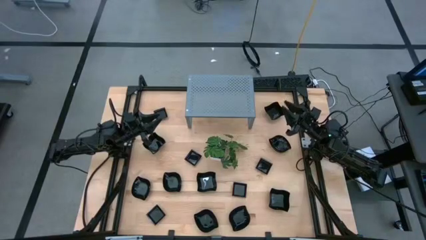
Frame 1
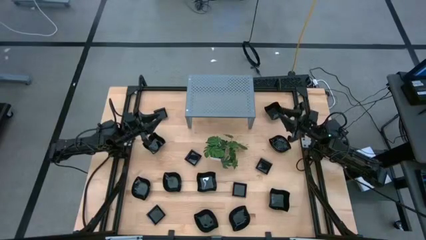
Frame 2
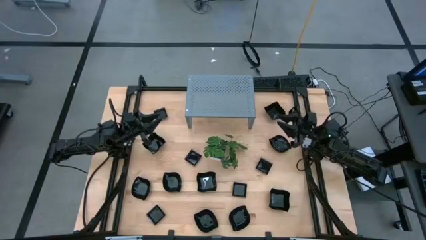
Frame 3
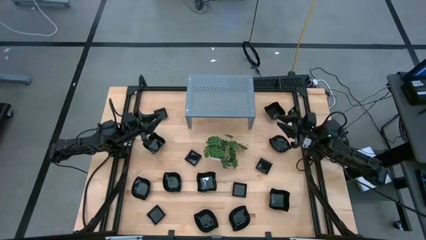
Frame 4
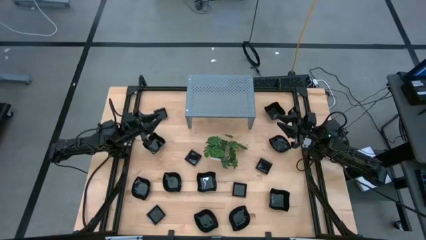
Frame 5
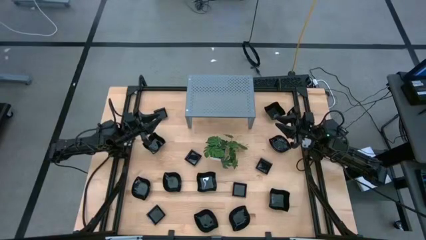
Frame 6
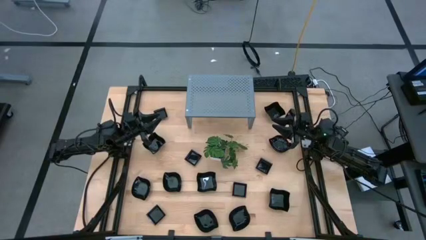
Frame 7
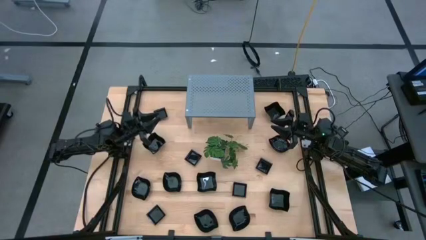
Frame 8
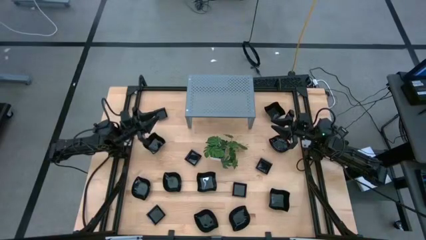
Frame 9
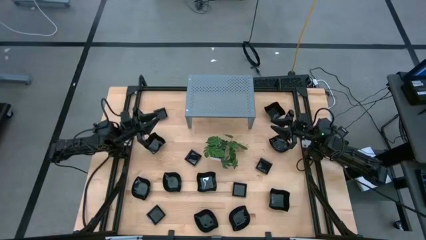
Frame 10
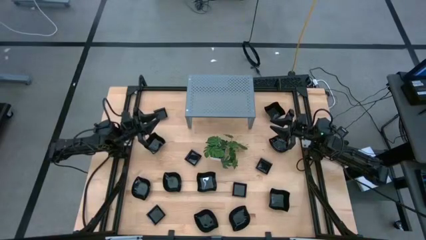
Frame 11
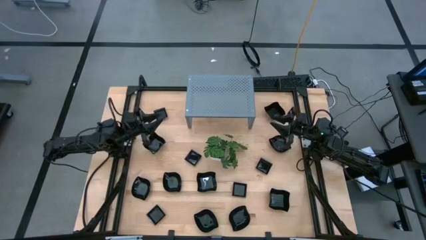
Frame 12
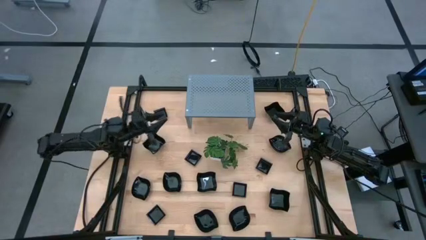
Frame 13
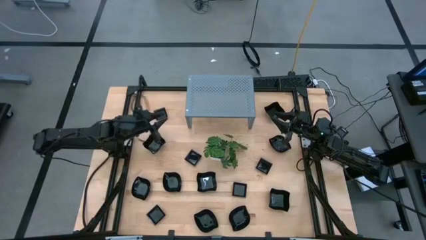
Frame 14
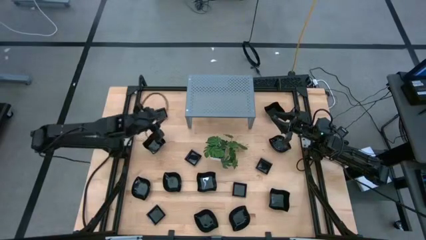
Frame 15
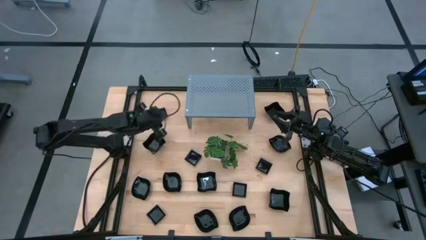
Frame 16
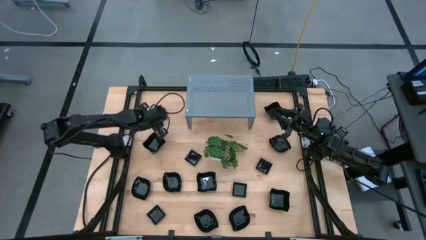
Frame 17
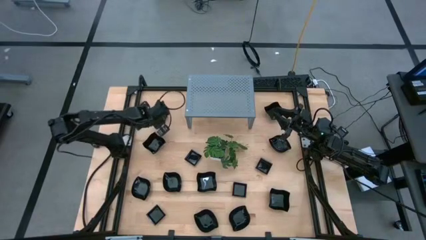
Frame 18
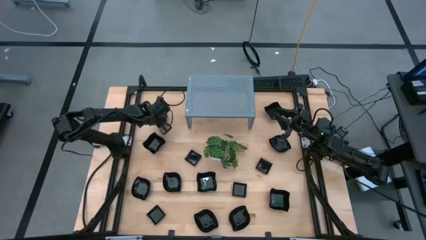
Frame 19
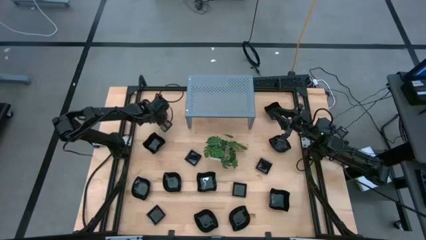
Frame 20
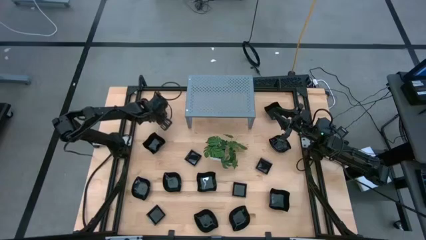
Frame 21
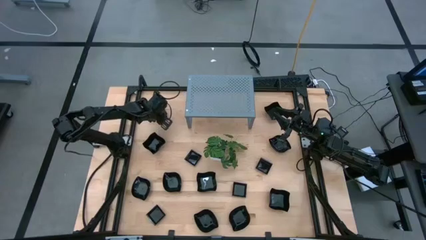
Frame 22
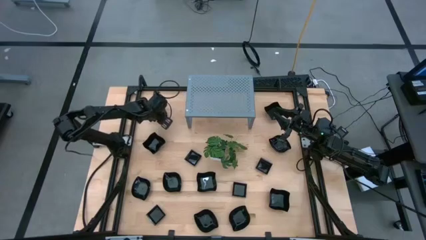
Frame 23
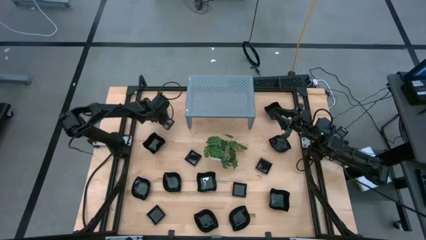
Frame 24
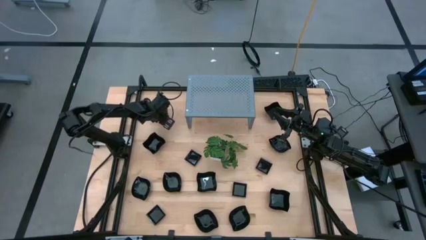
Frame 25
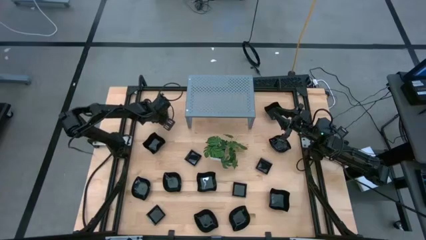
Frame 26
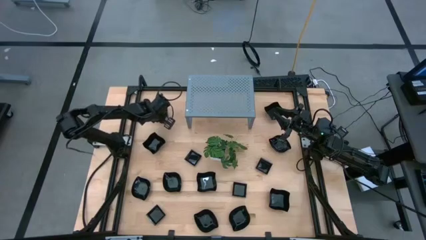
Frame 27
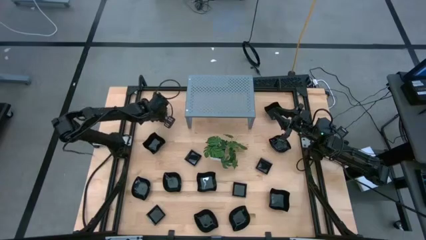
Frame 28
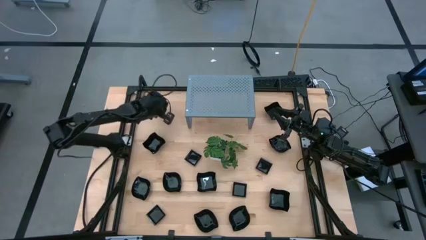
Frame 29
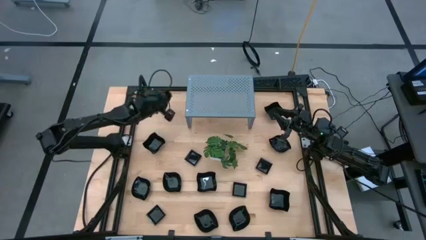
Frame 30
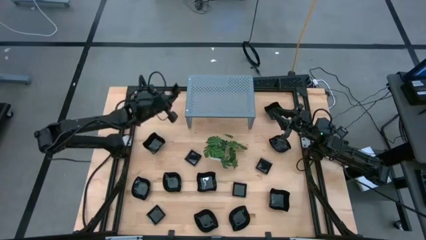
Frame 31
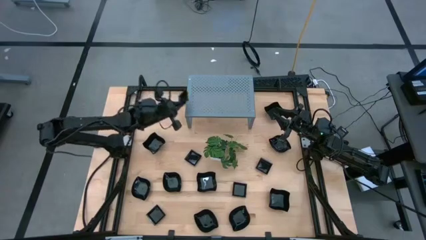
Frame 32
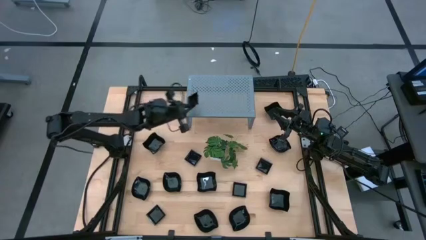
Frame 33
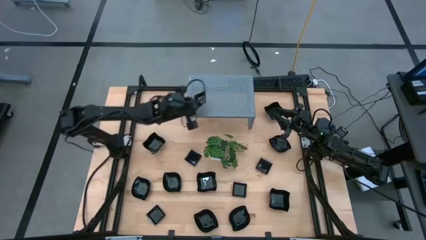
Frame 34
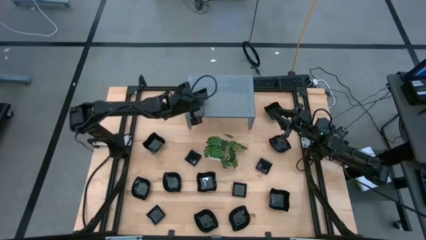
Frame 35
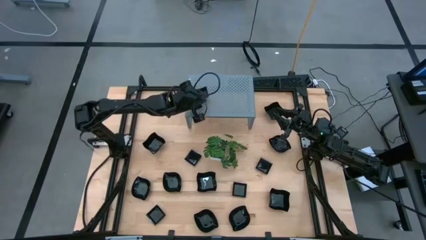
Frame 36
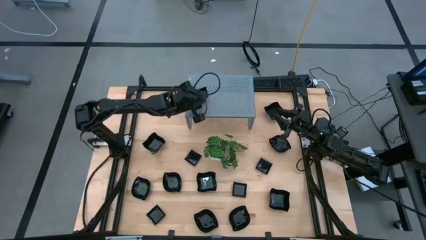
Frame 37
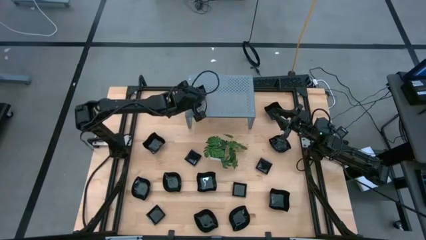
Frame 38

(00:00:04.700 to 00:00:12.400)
Task: Pick & Place Mini shaped plates
Put the square black bowl on the shelf

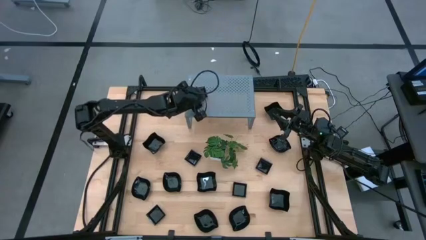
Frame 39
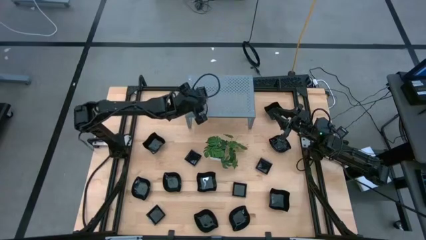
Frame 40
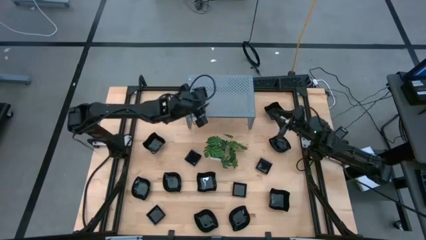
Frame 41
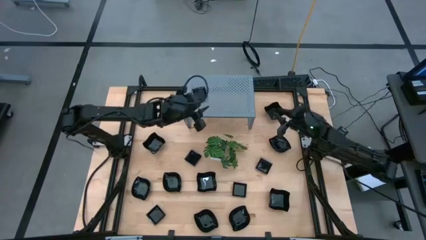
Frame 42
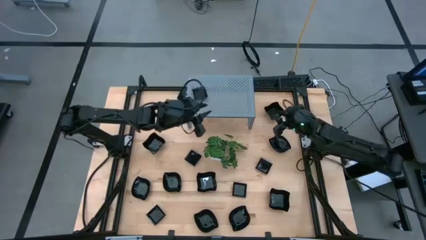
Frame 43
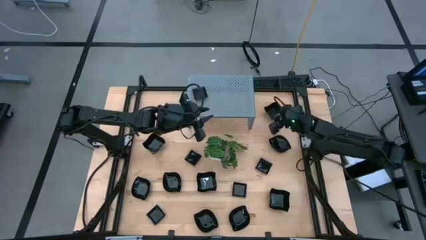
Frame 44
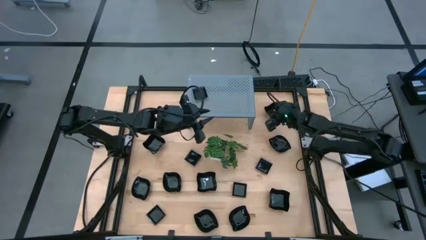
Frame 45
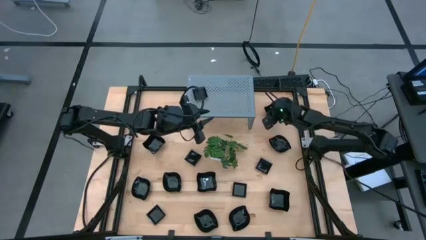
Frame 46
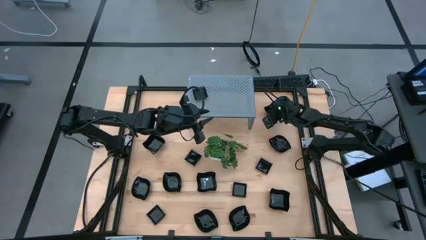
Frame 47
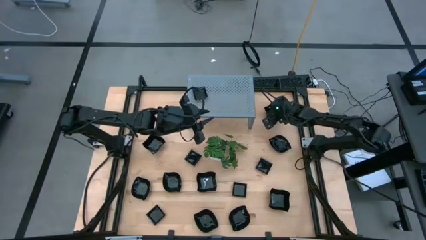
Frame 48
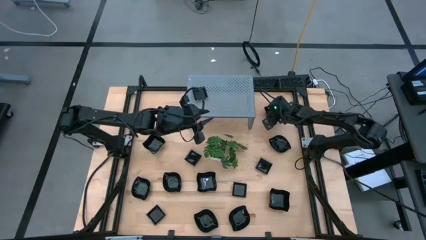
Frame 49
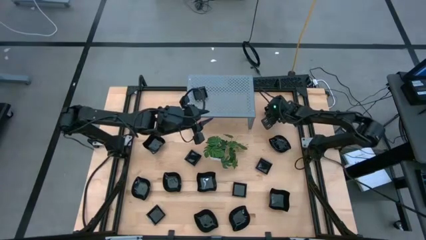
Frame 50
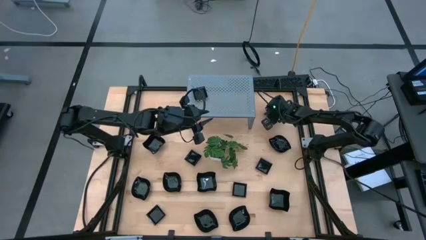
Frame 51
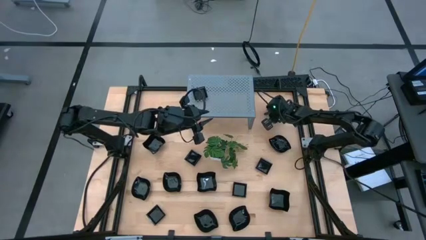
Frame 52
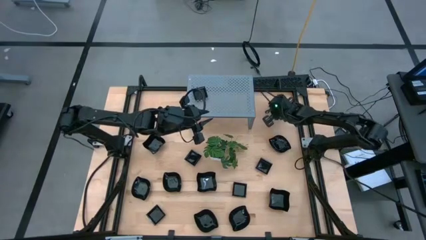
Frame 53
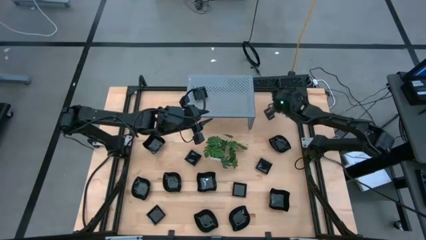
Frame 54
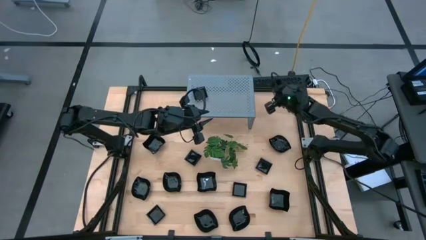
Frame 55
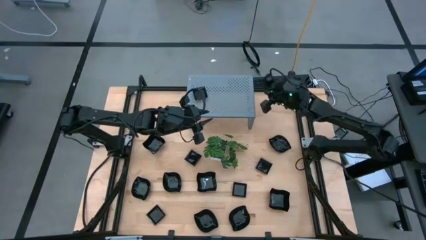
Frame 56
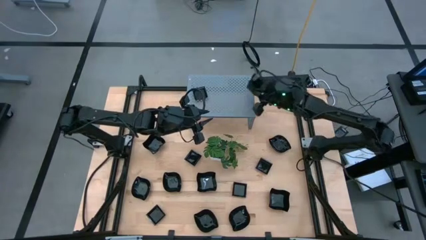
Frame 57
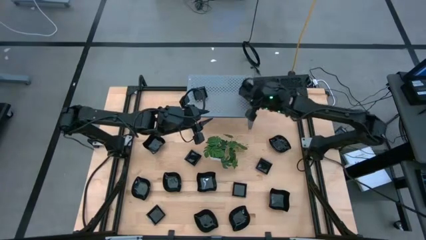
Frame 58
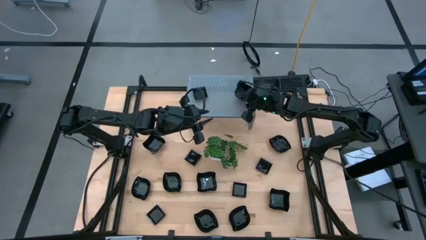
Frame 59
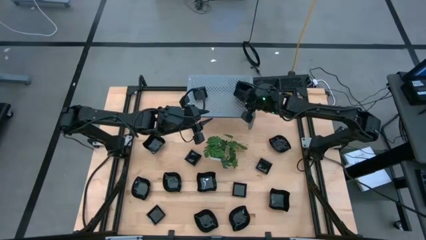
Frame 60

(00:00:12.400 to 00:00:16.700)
Put the distorted square black bowl on the shelf

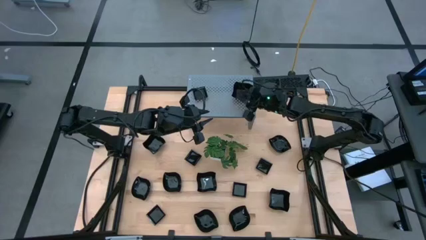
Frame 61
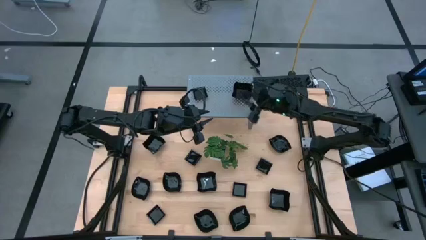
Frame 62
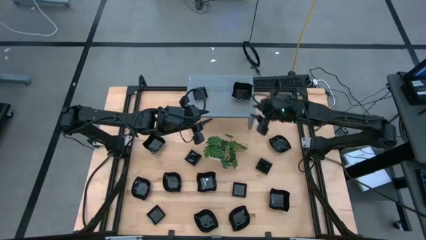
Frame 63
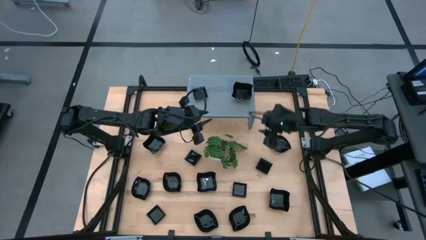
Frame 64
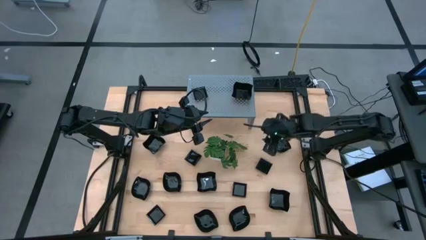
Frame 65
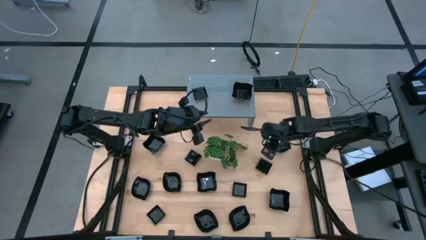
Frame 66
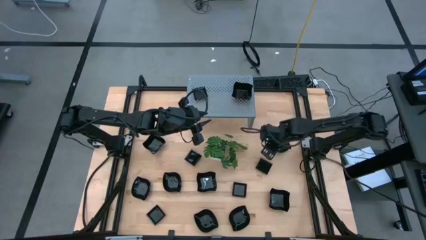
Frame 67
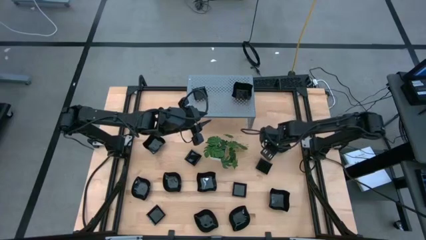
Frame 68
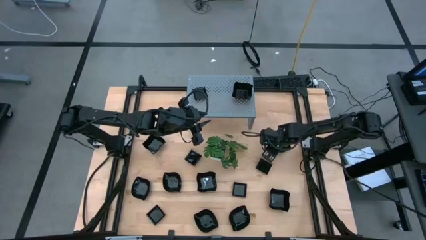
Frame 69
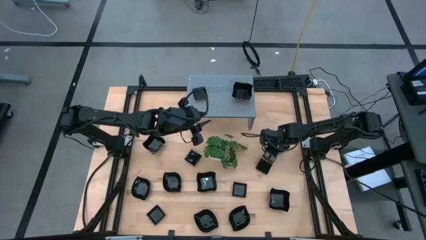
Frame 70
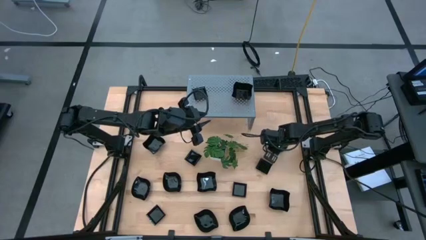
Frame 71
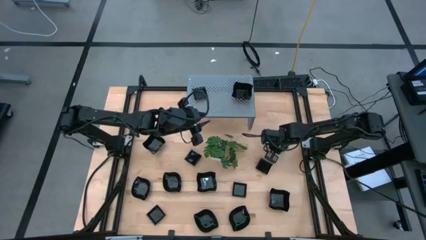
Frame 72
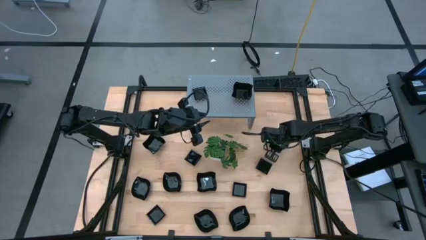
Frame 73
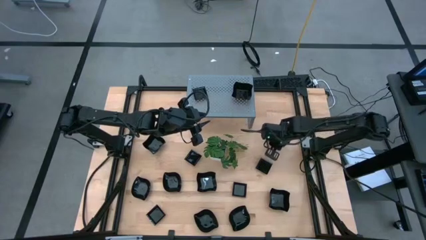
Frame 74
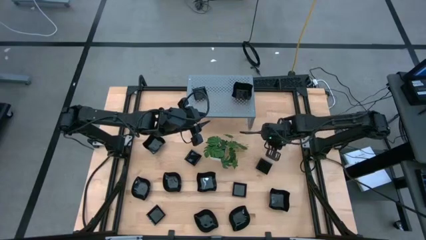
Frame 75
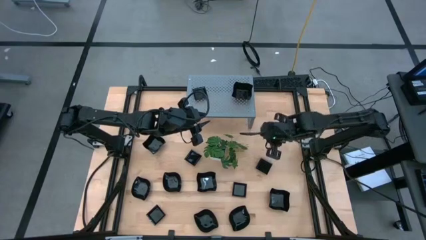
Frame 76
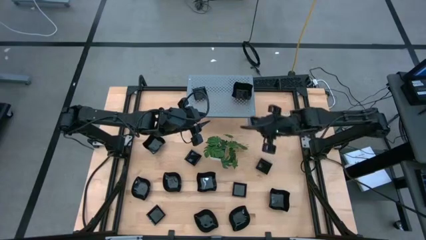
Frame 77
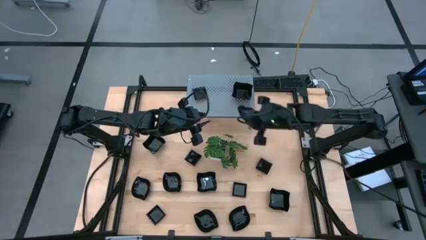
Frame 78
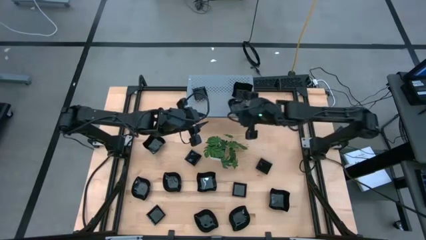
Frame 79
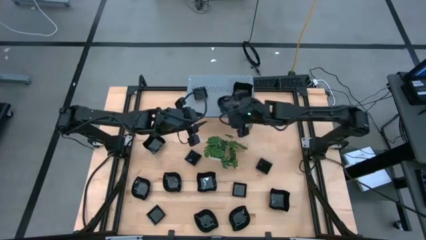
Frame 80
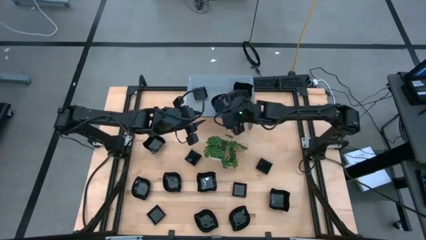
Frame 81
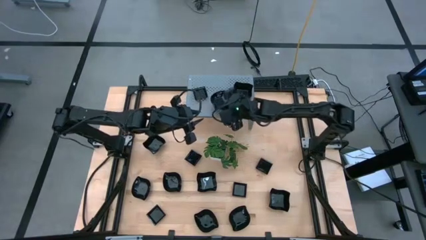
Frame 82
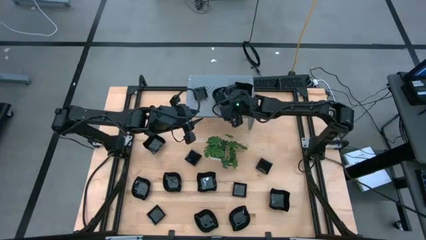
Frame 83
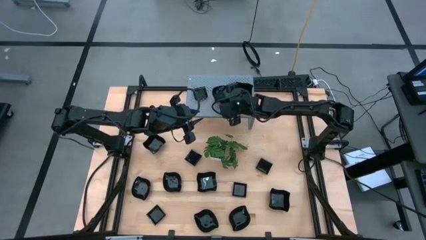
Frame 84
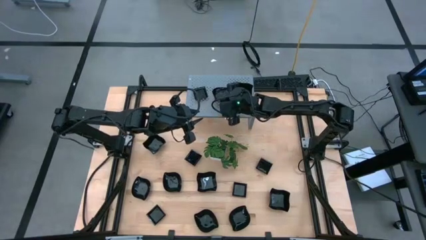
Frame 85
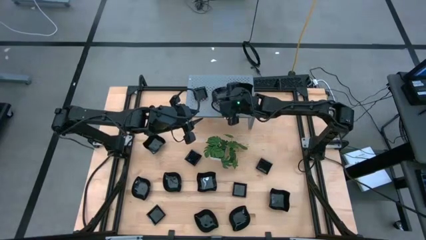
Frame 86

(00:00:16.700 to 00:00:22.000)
Put the leaf-shaped black bowl on the shelf
